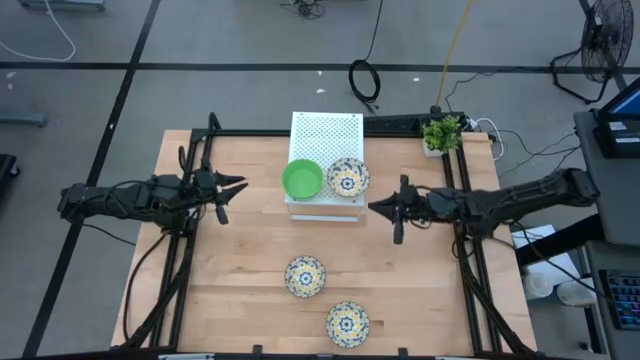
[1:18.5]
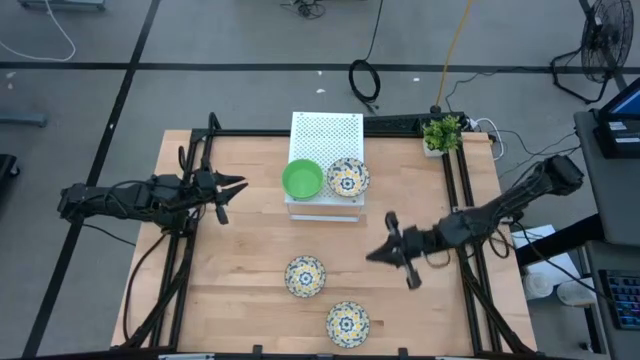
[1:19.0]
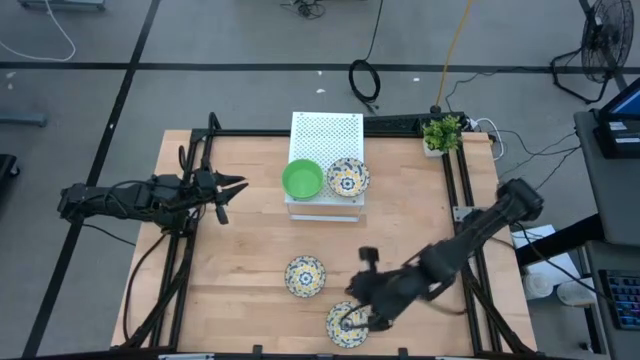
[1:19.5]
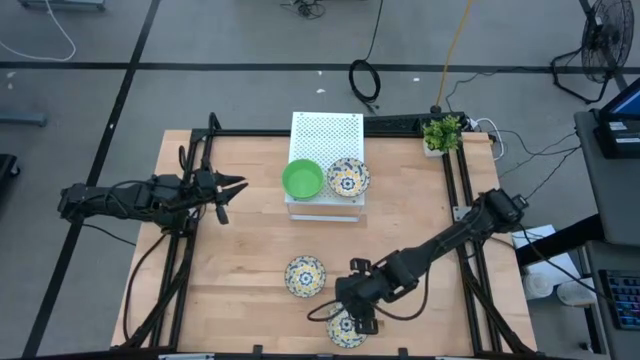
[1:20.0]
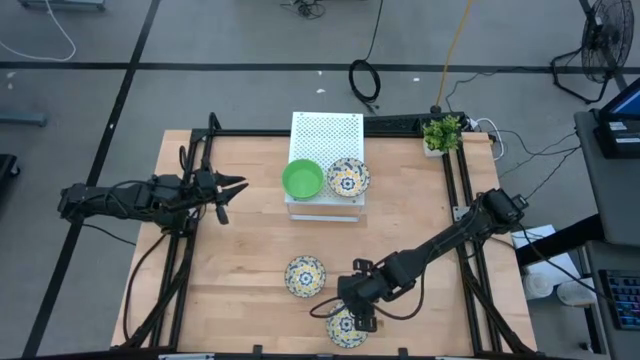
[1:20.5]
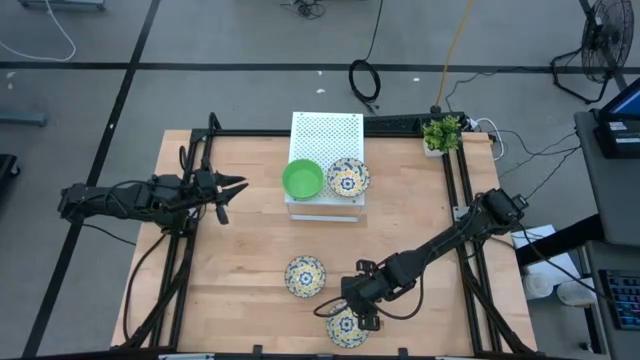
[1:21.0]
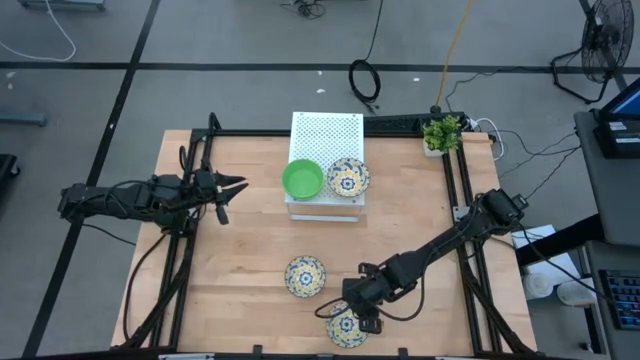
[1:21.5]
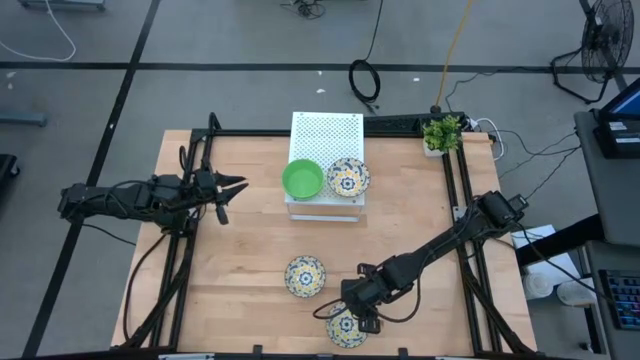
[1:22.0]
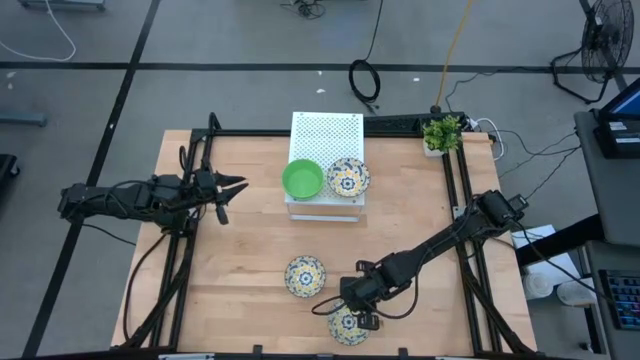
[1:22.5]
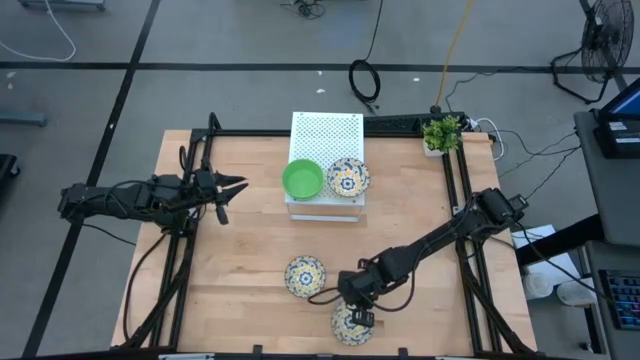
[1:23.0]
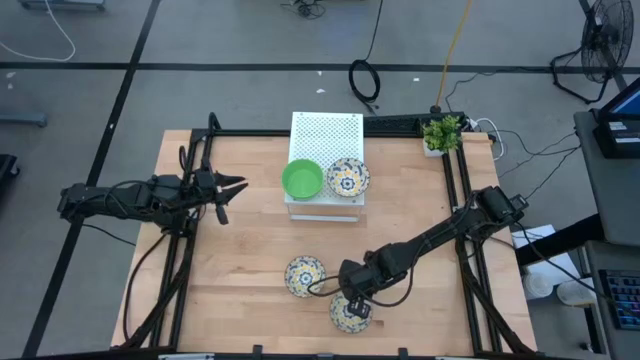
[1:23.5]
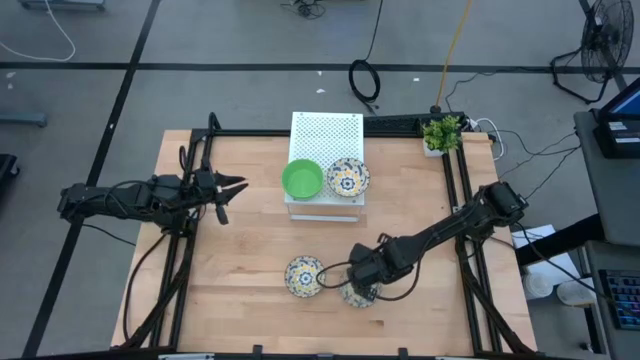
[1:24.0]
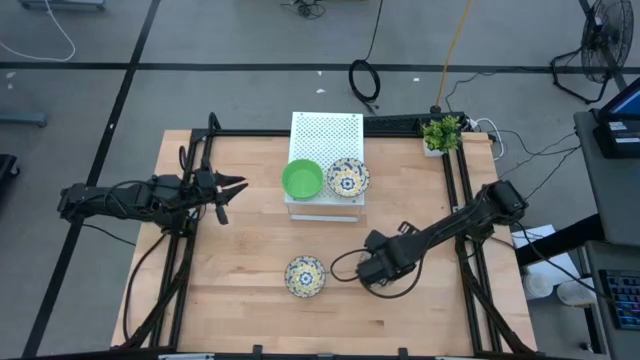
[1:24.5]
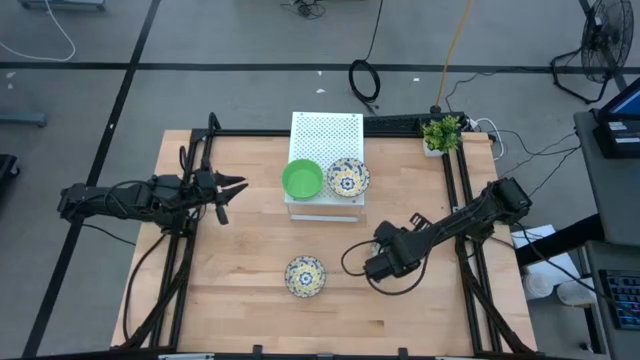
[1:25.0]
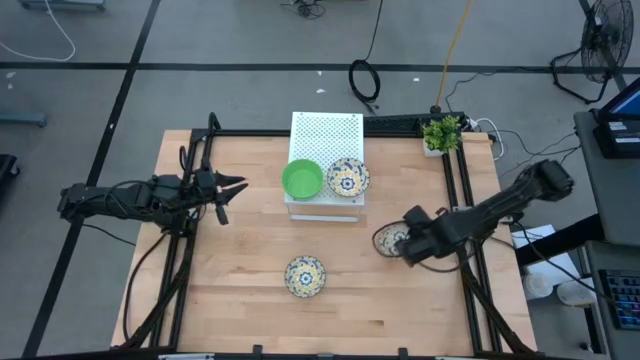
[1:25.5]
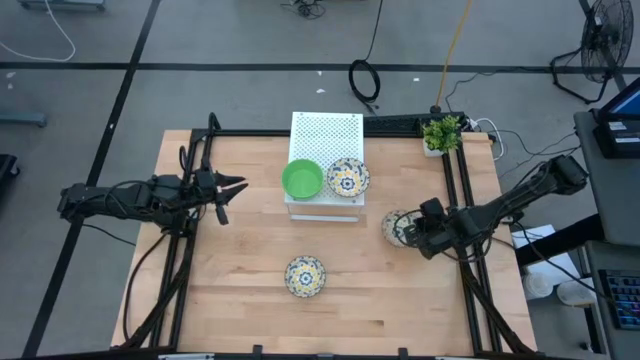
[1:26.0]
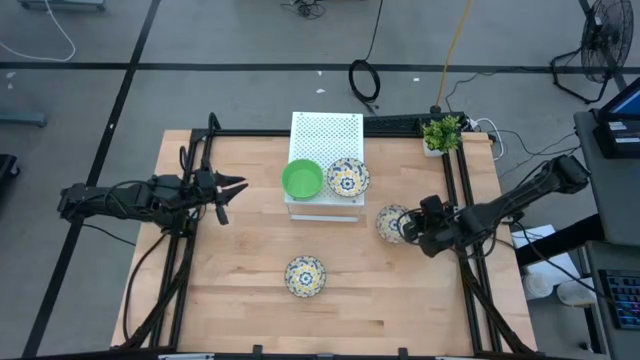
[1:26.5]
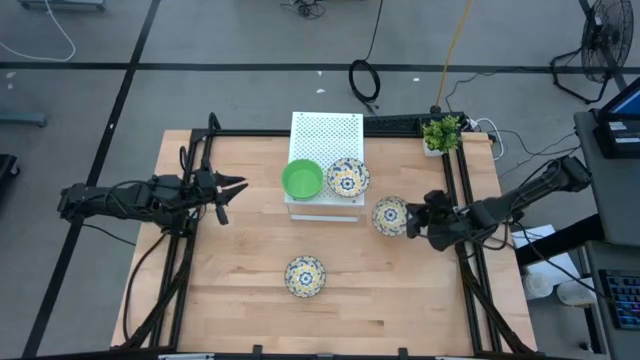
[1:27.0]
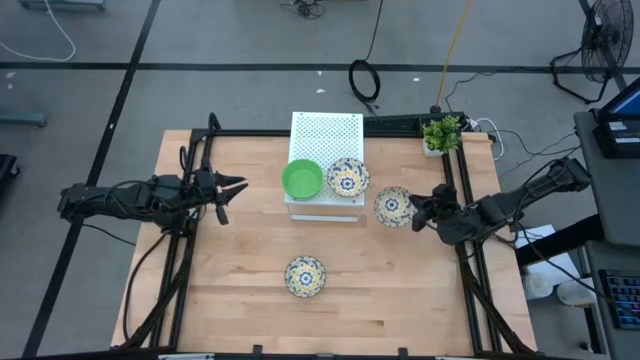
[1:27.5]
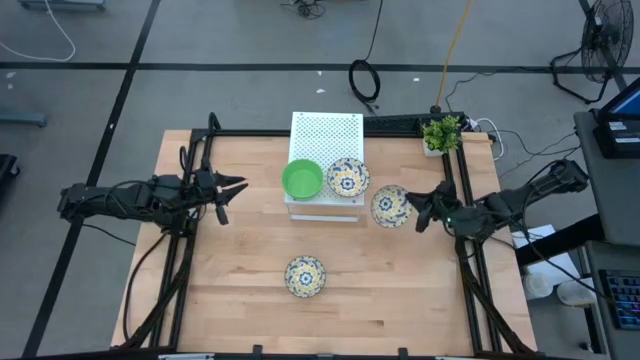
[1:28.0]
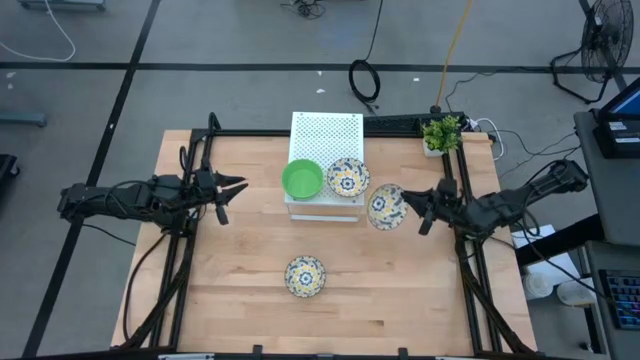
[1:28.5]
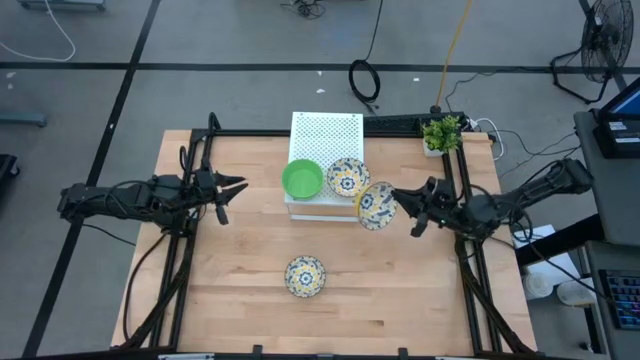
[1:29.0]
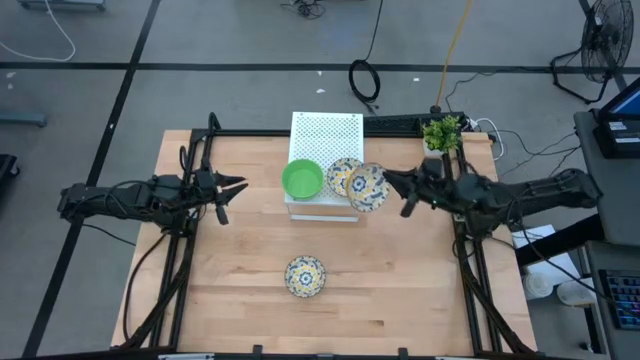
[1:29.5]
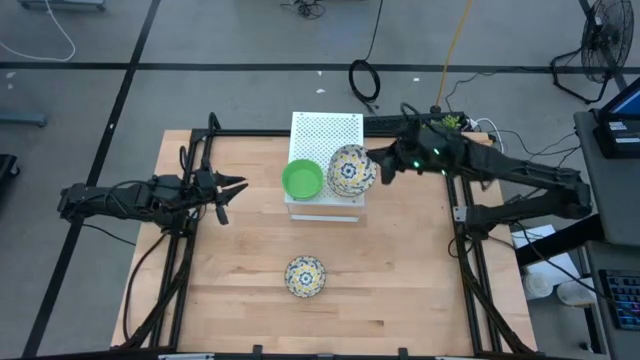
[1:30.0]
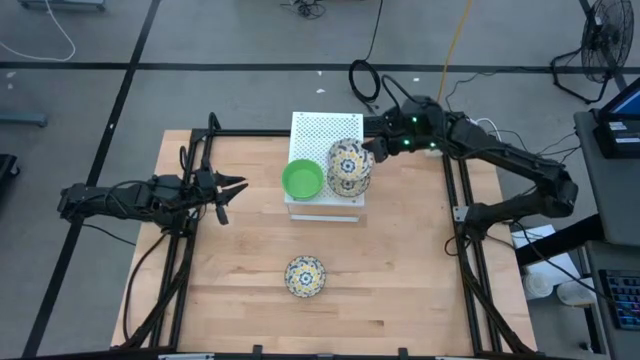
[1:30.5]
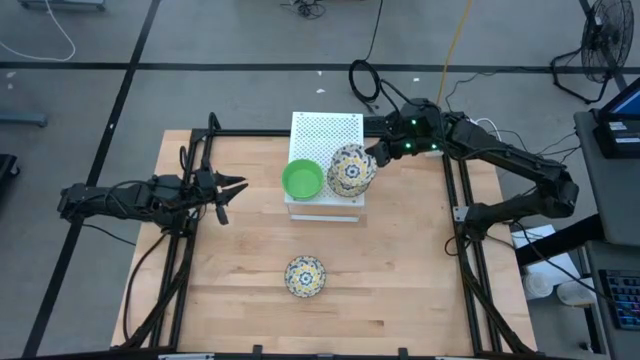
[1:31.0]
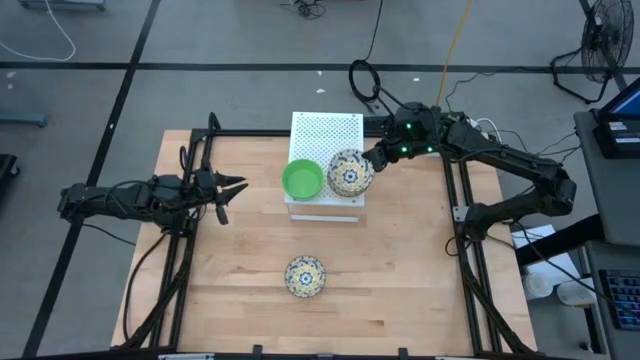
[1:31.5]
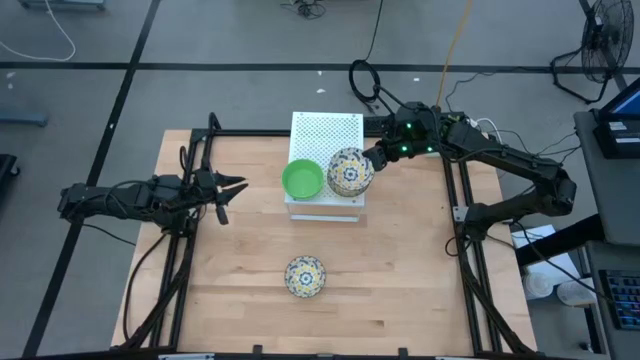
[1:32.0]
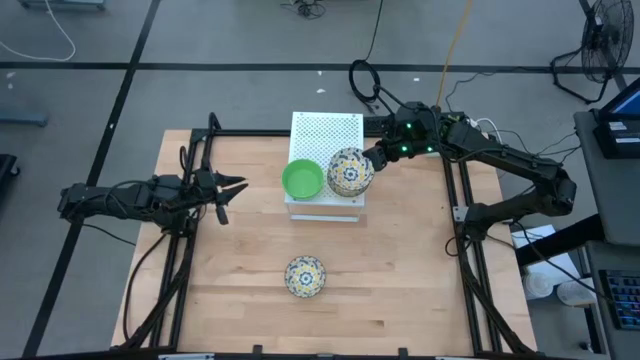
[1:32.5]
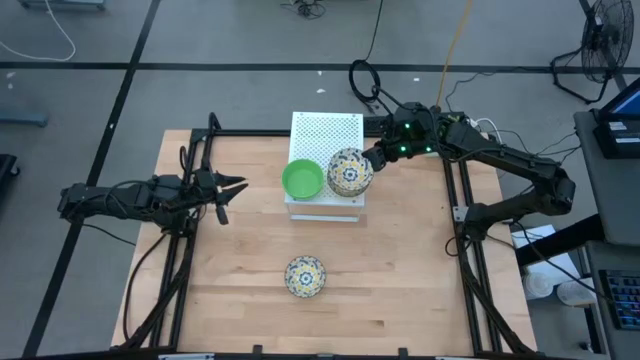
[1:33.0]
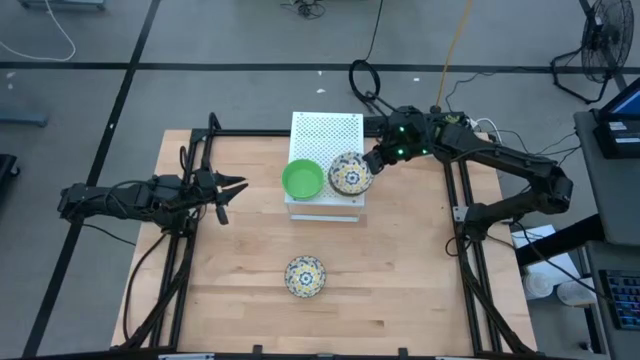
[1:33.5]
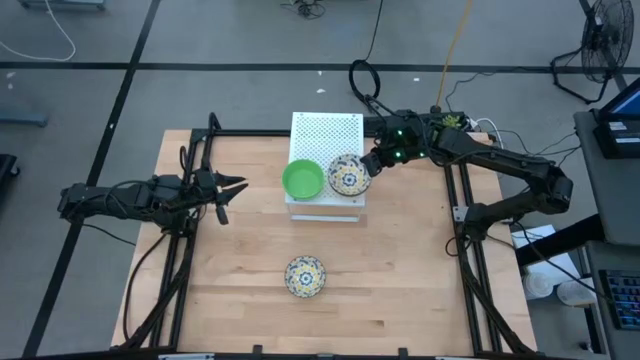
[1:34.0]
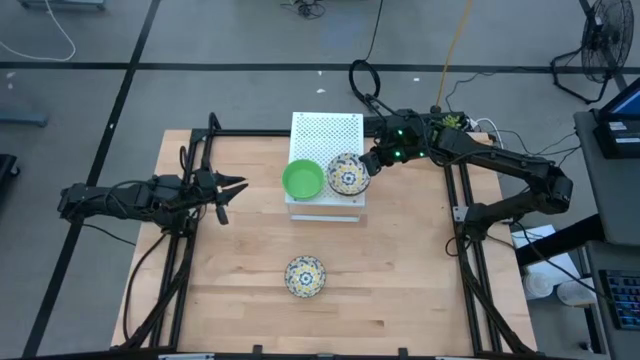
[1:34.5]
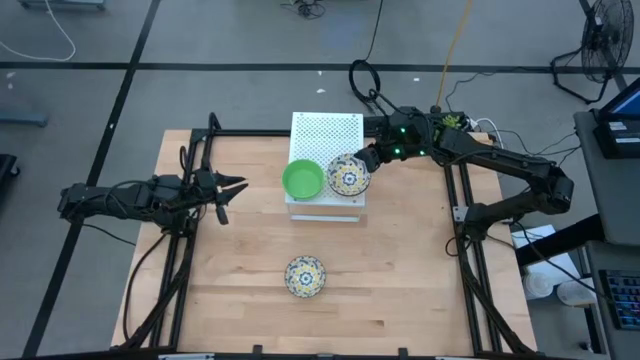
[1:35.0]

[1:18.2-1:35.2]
Task: Pick & Place Mini bowls
Stack the bottom white bowl on the shelf

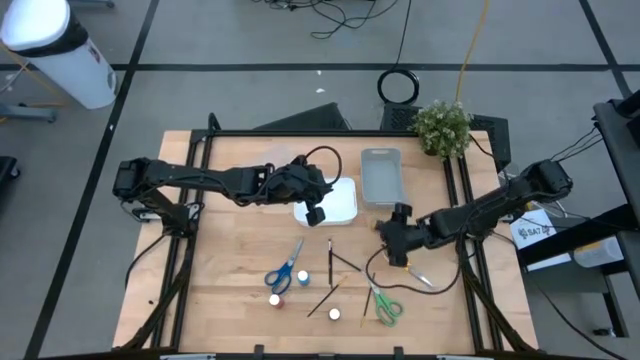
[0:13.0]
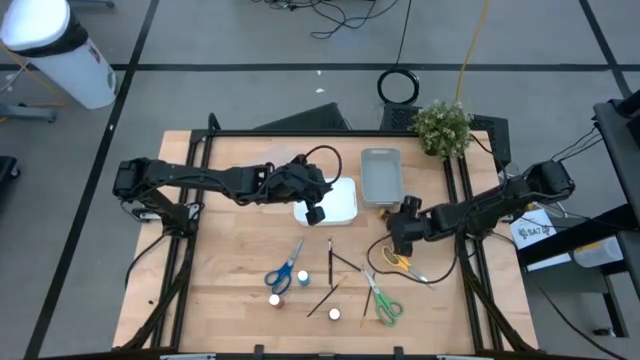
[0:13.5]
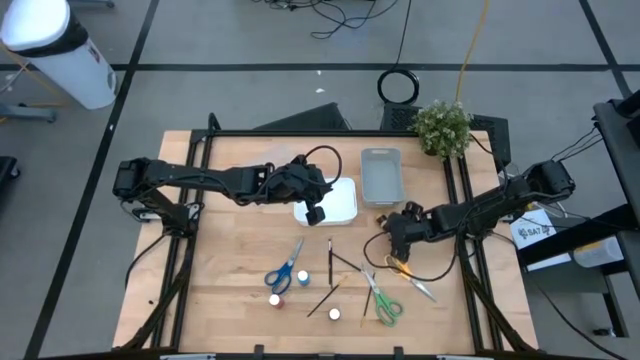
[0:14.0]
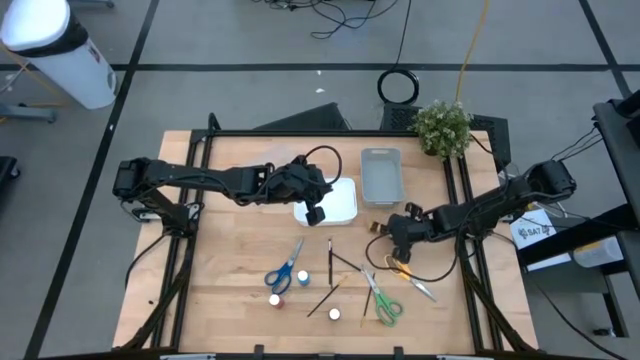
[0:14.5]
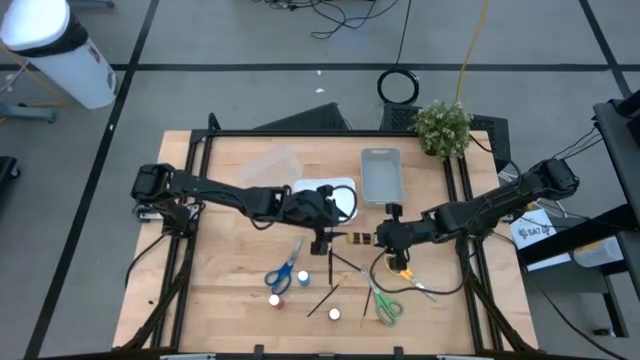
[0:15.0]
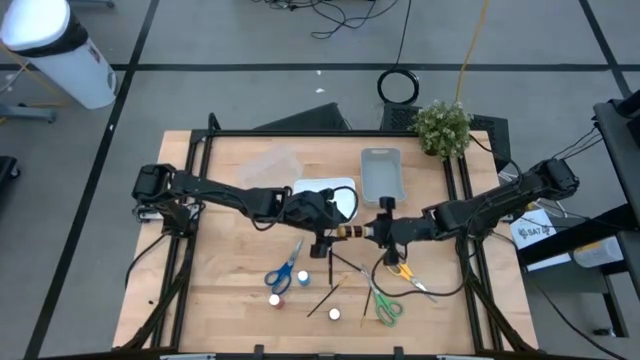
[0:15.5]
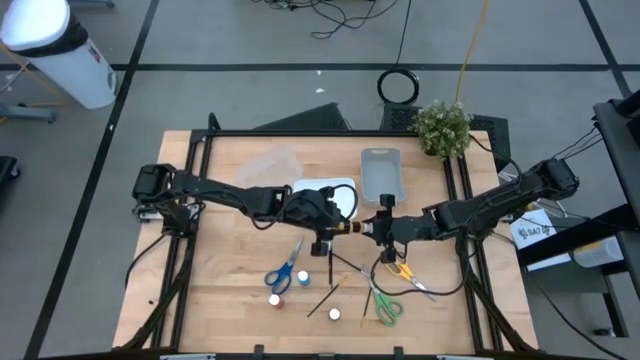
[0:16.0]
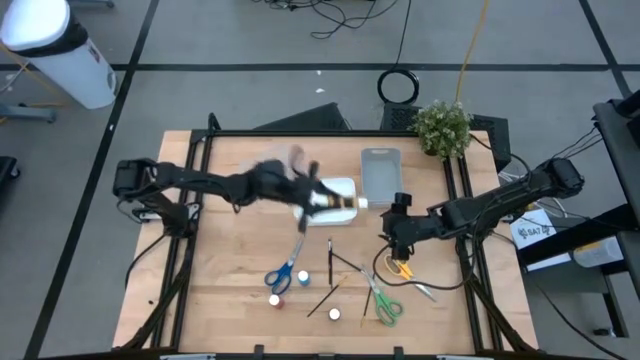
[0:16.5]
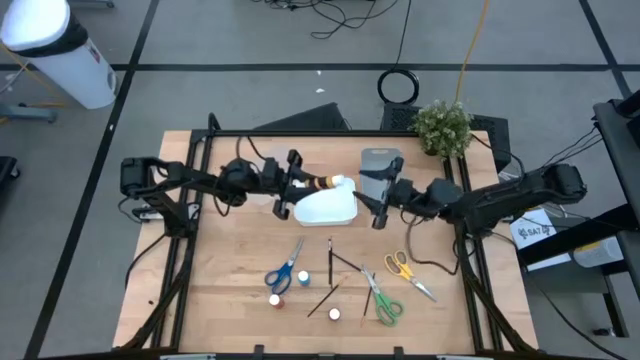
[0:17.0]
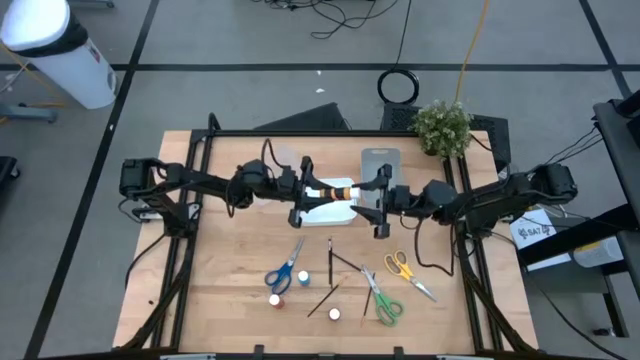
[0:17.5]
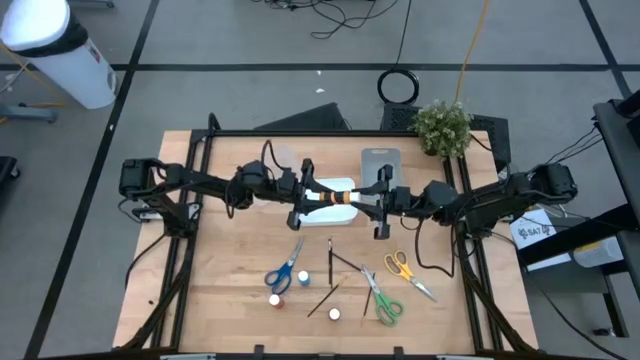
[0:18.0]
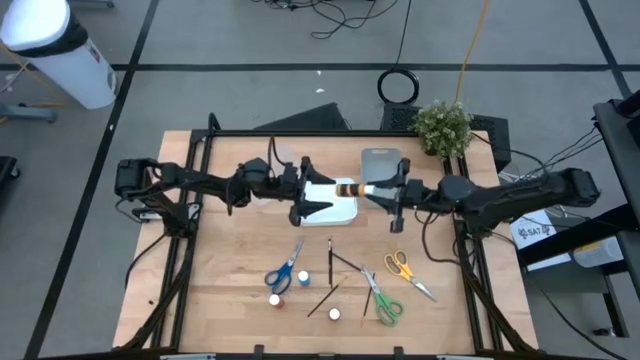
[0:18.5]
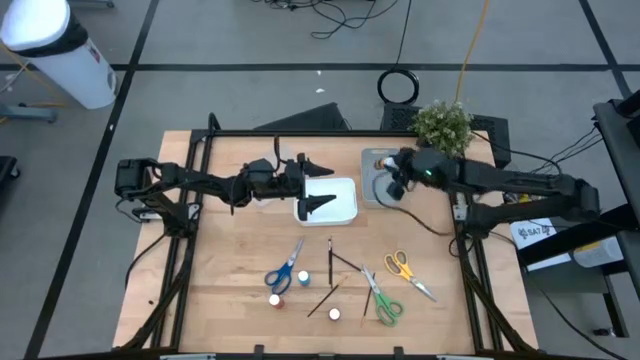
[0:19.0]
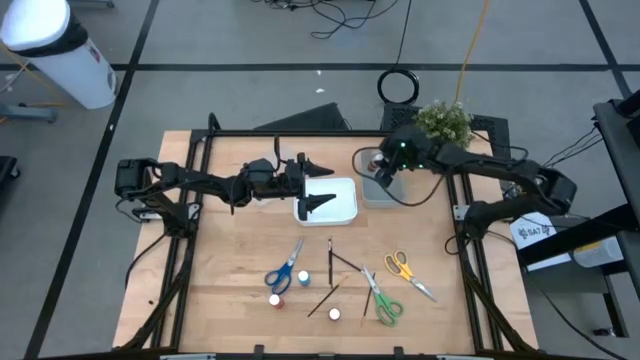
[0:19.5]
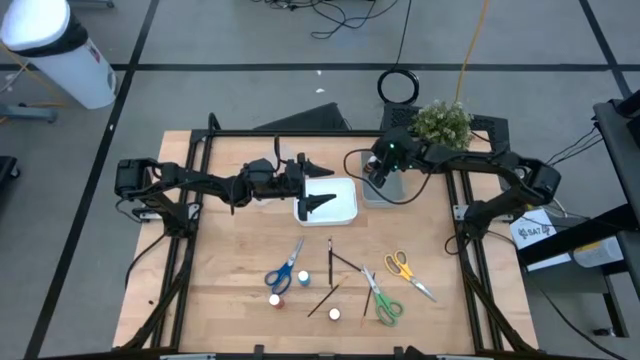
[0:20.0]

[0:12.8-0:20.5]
Task: Pick & Place Paint Supplies
Put the yellow paint bottle in the gray bin
